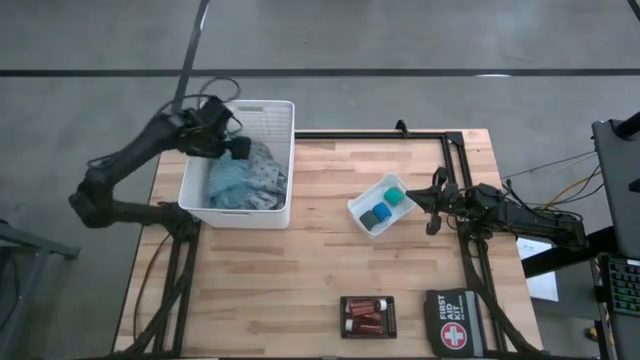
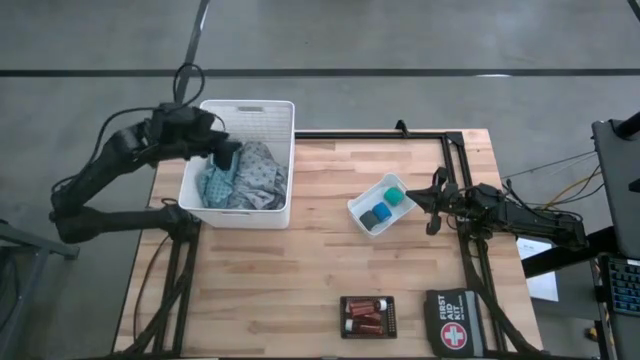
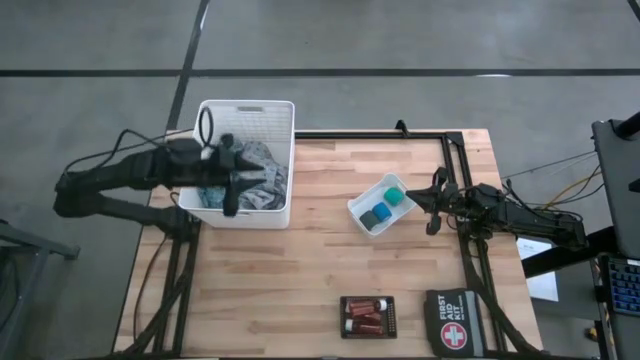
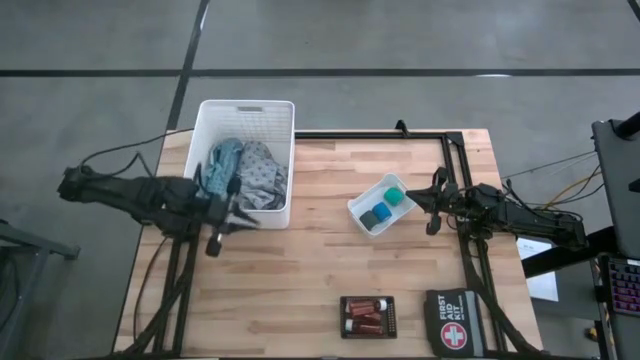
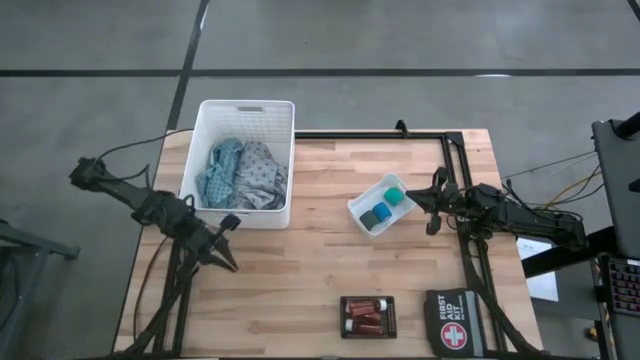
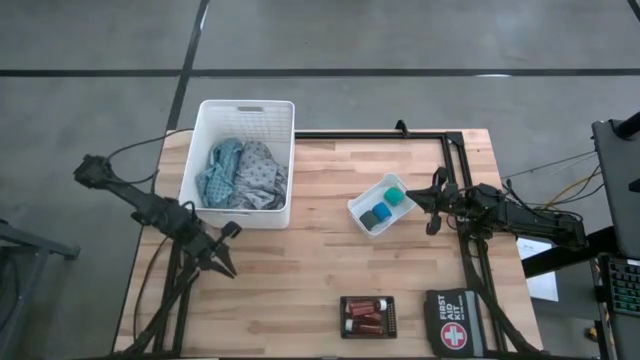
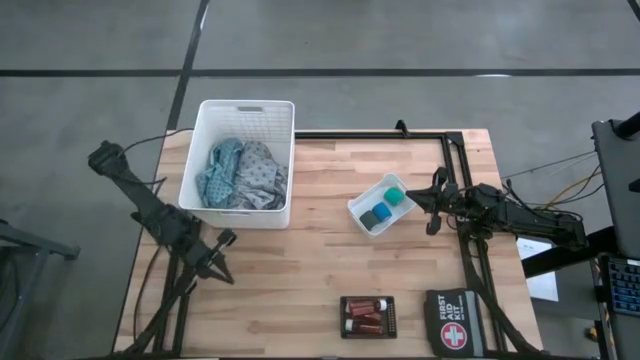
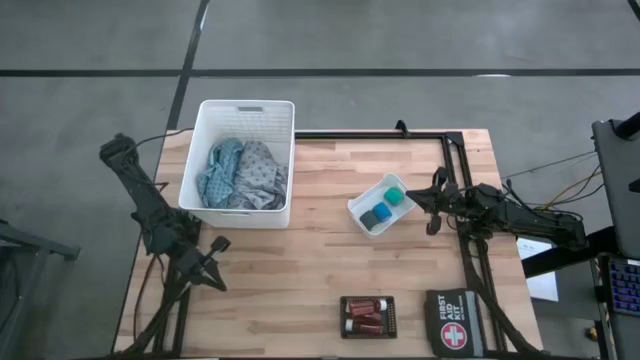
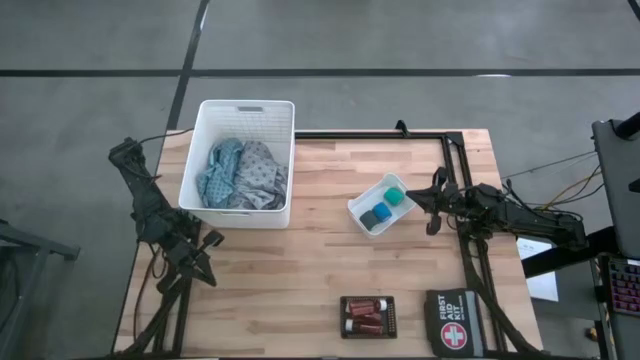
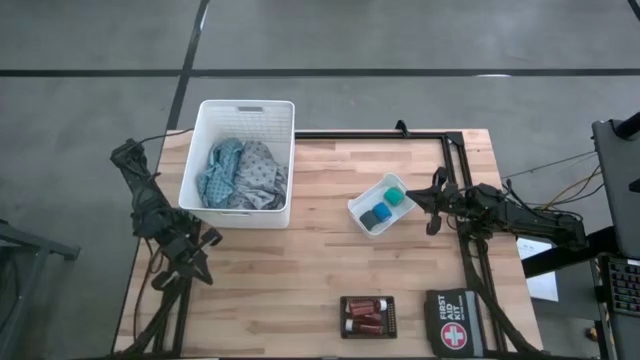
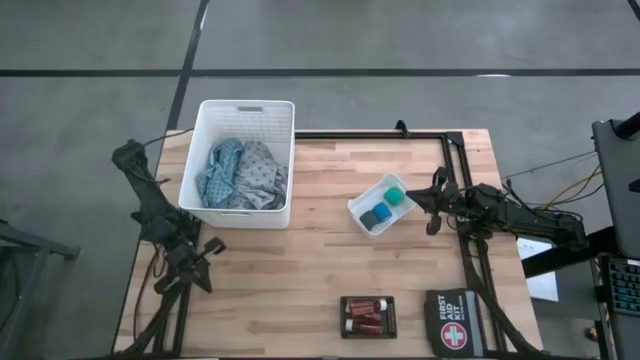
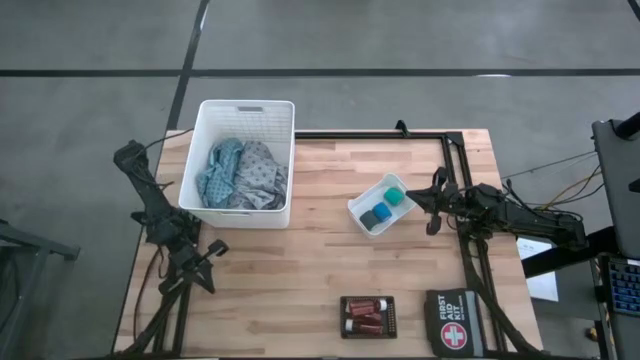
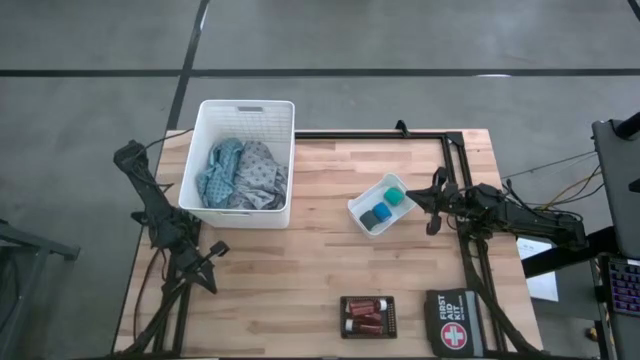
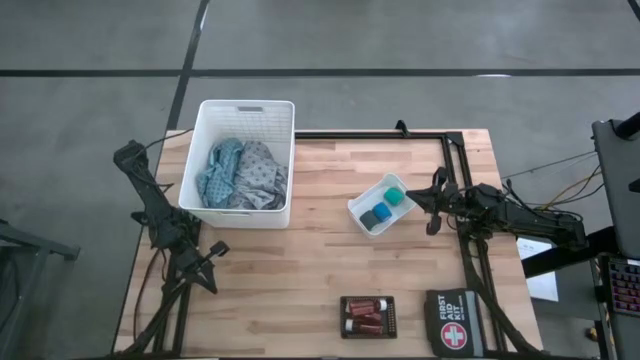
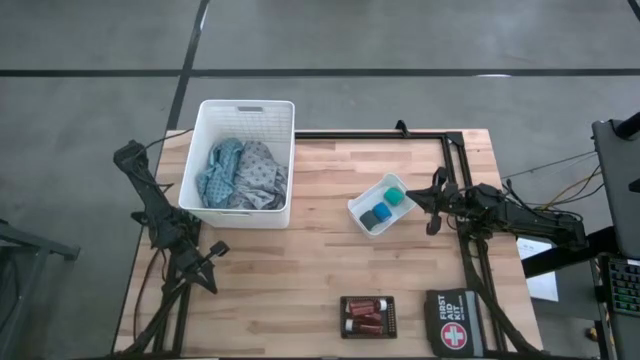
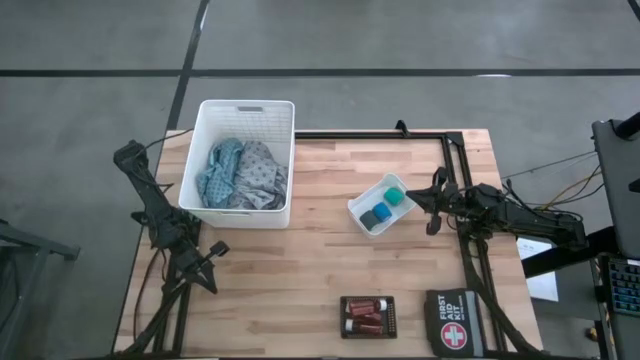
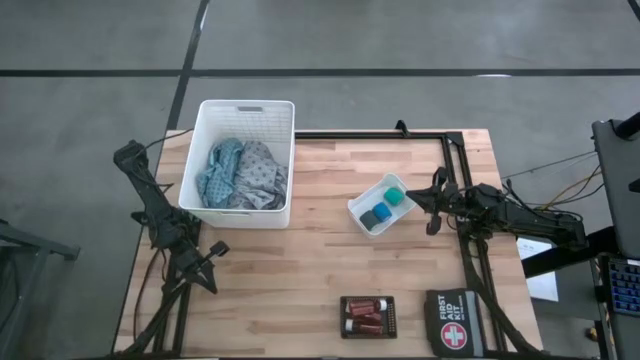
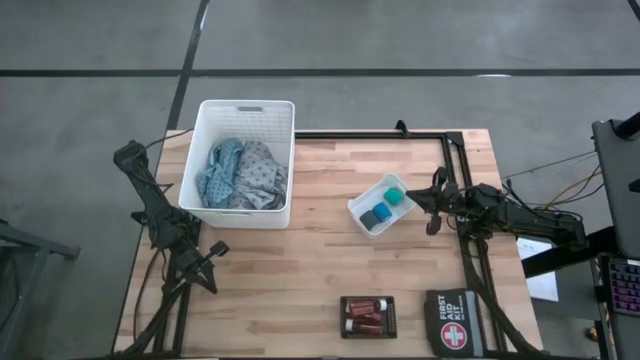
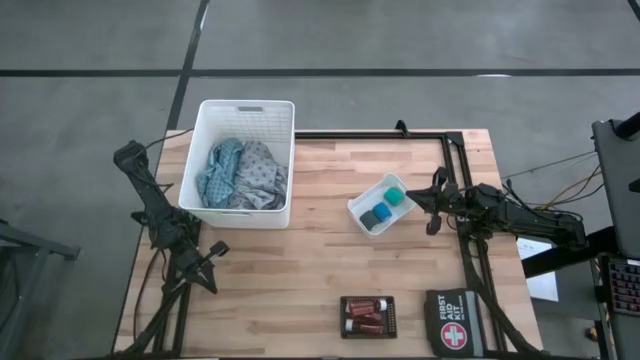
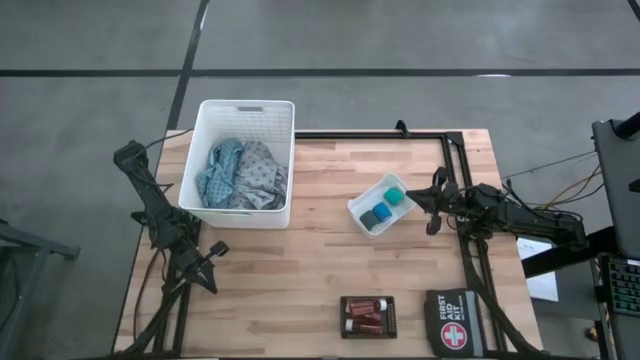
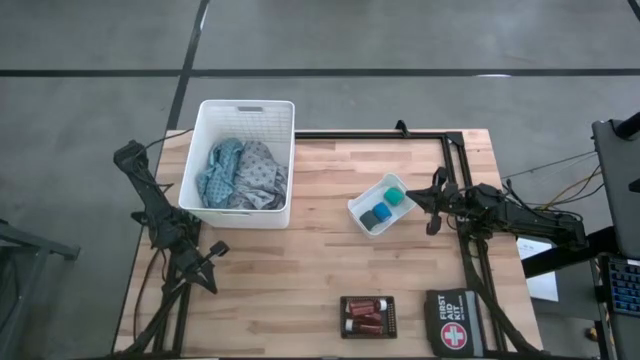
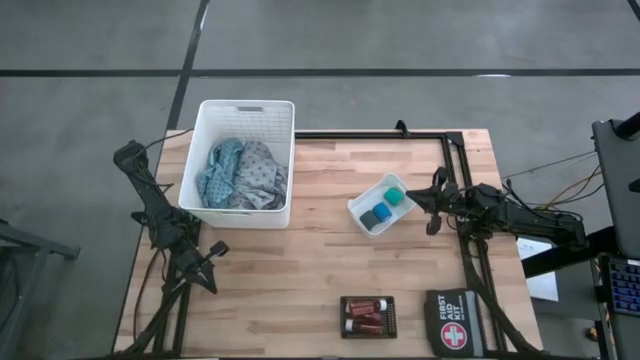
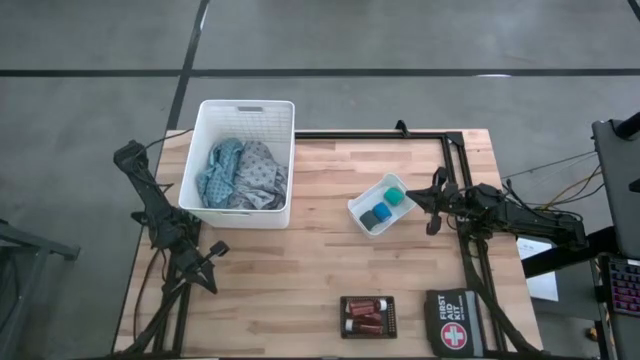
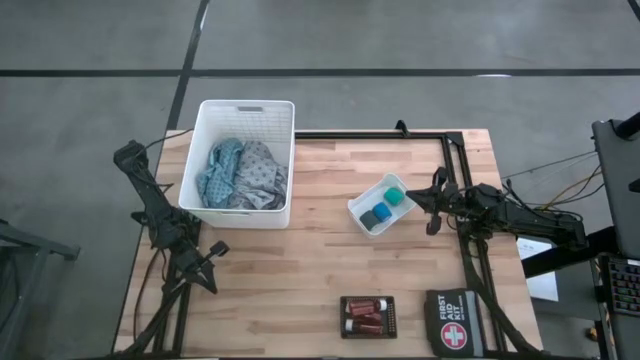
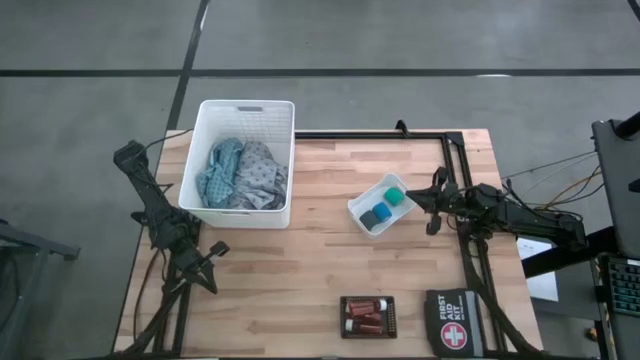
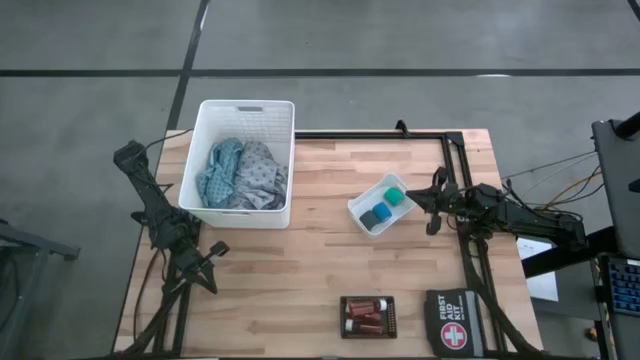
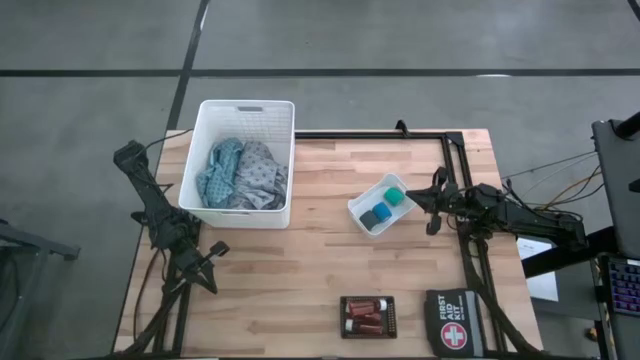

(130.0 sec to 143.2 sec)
Task: Pick & place medical supplies in basket/bin
Return to Home Position
